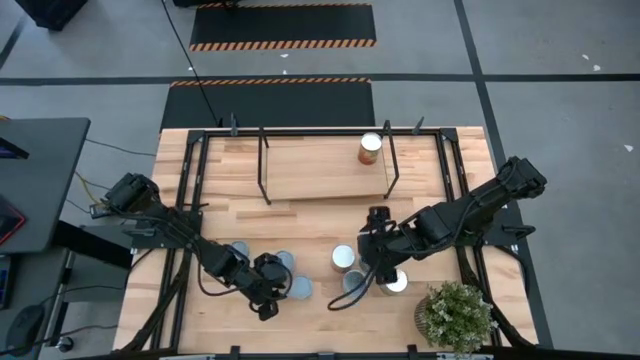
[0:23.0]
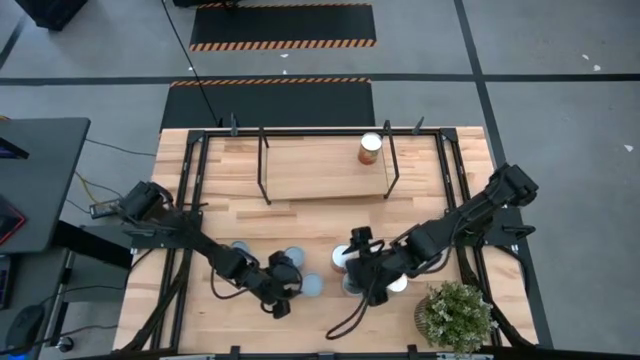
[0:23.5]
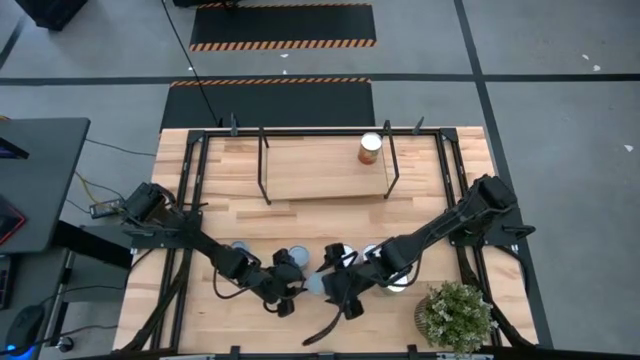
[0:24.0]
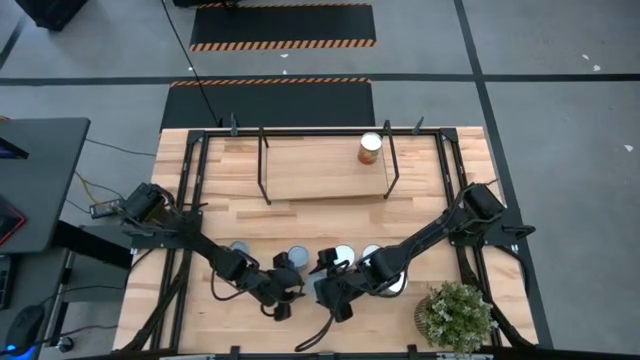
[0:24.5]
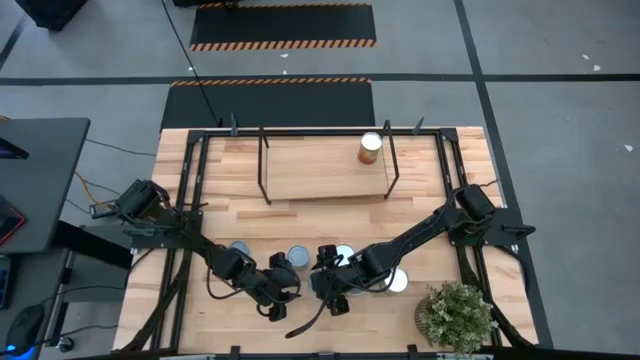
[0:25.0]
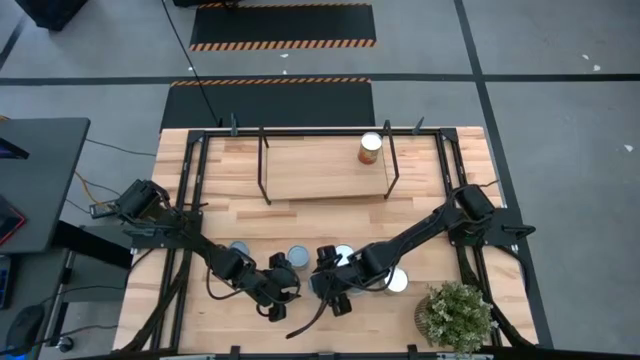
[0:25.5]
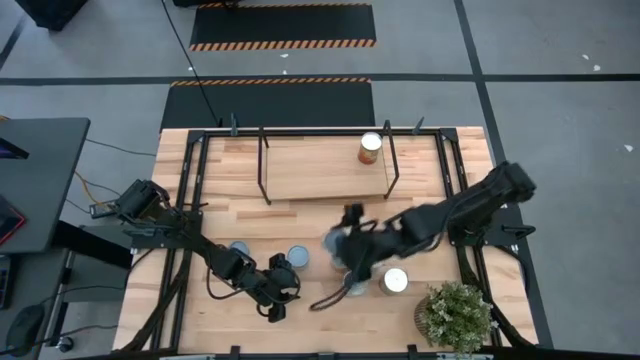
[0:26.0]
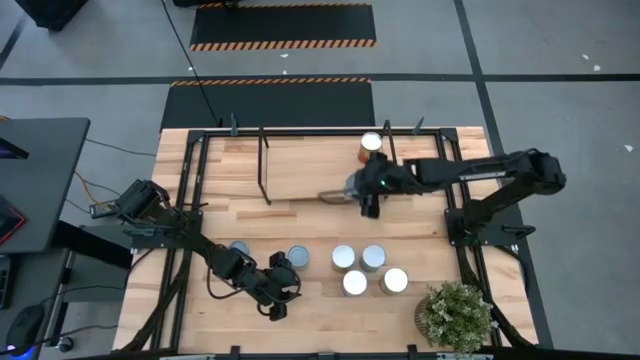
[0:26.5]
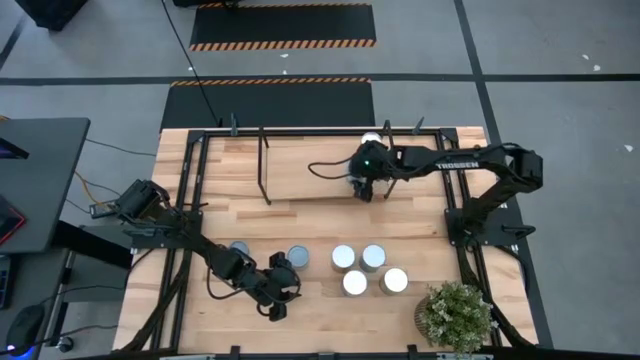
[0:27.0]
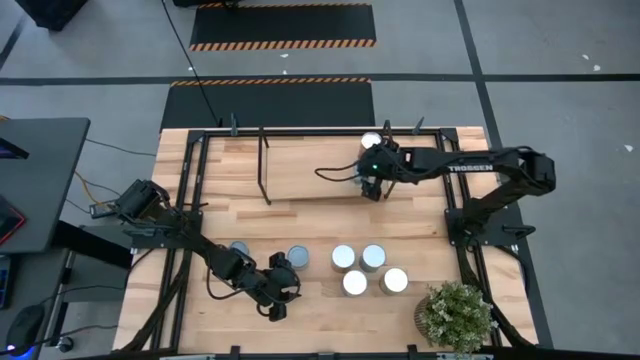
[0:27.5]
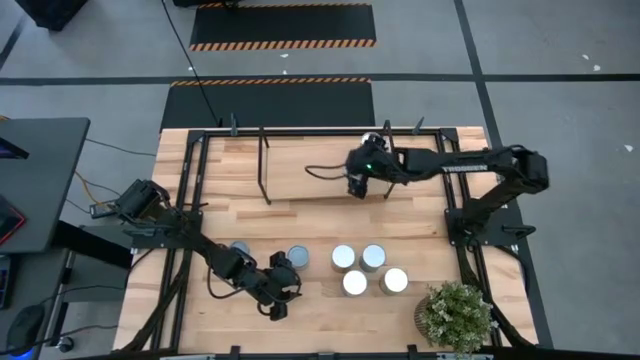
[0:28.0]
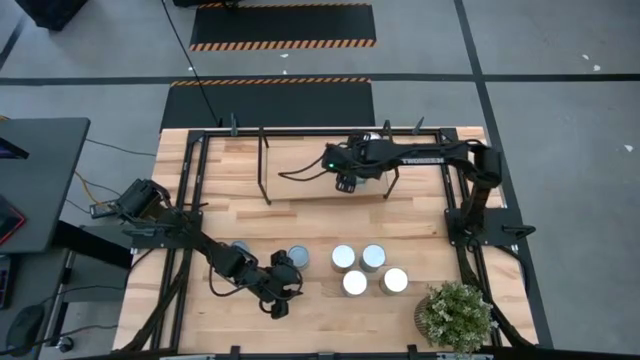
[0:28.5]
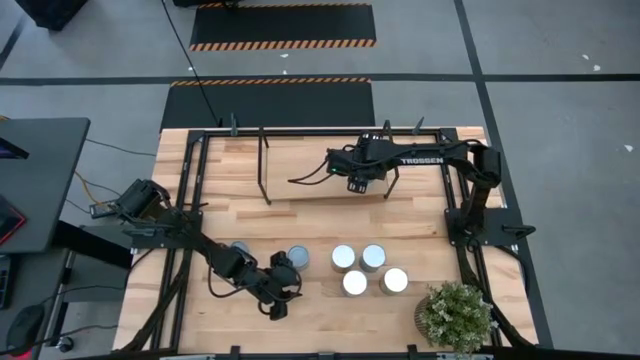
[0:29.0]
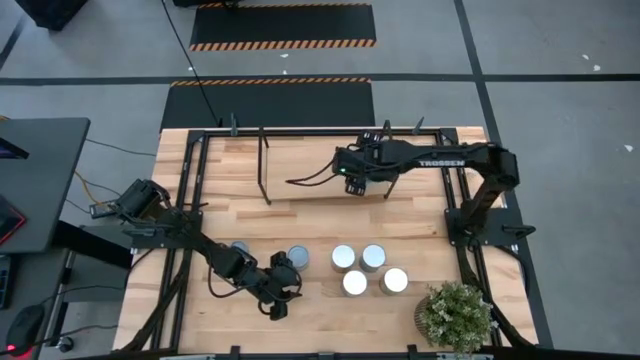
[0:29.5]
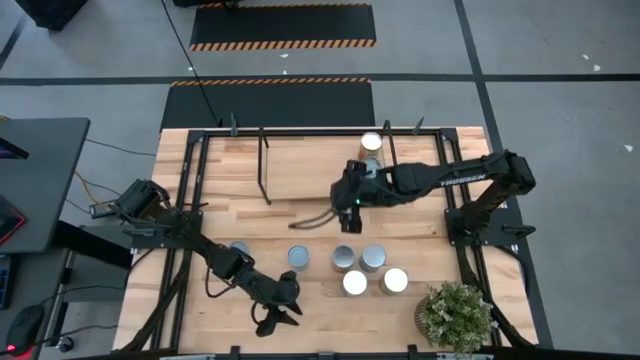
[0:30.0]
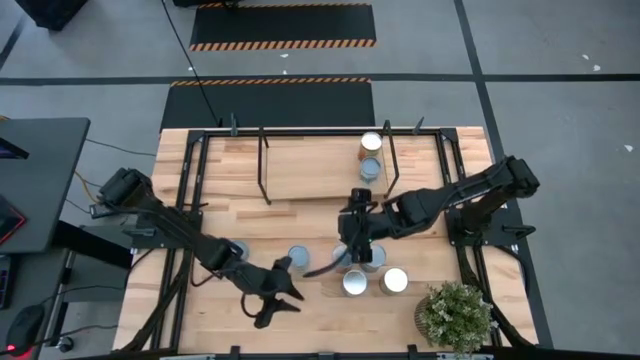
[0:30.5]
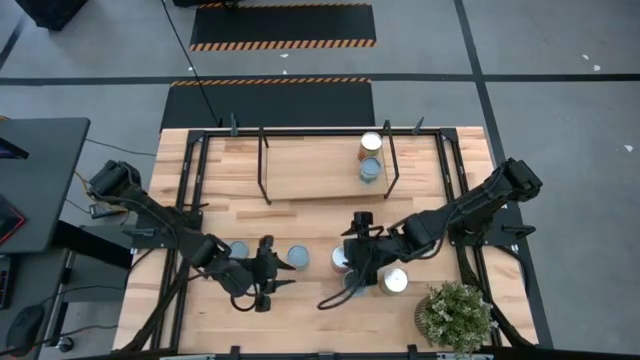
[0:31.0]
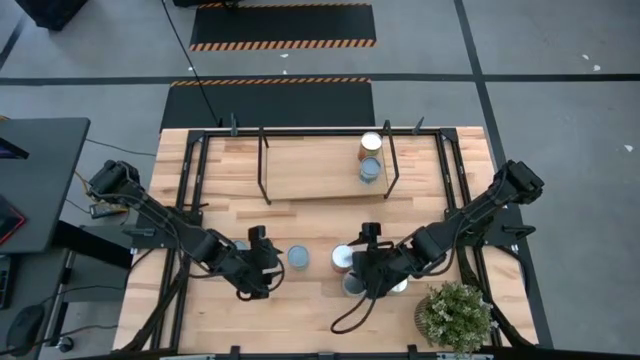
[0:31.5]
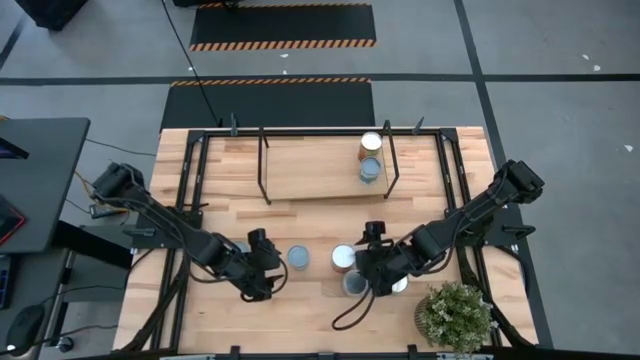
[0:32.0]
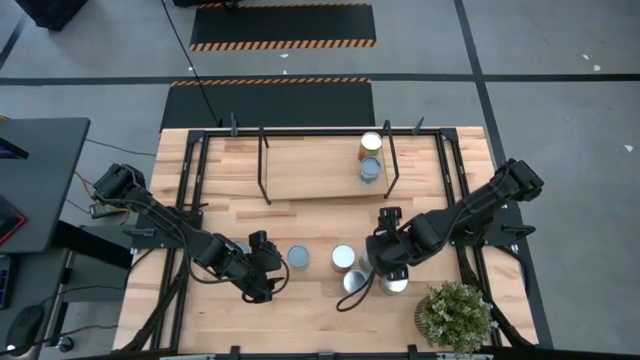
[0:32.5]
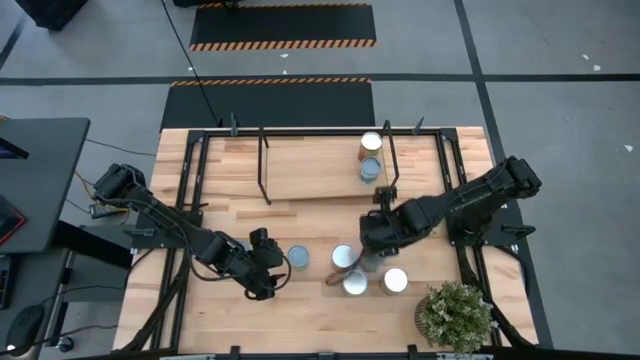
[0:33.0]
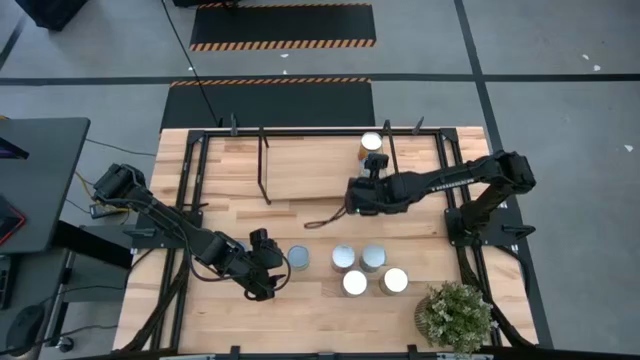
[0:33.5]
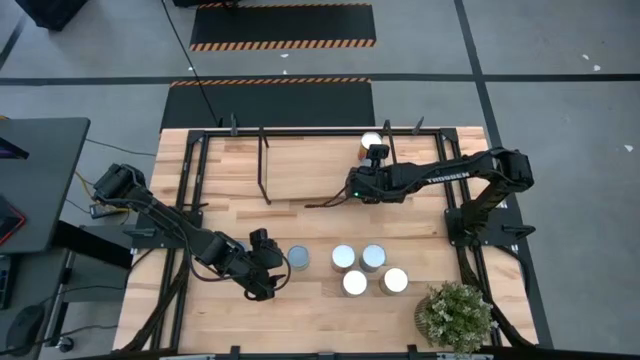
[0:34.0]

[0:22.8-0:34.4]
Task: Pick and place cans onto a shelf
Put the canned mixed vegetables on the shelf

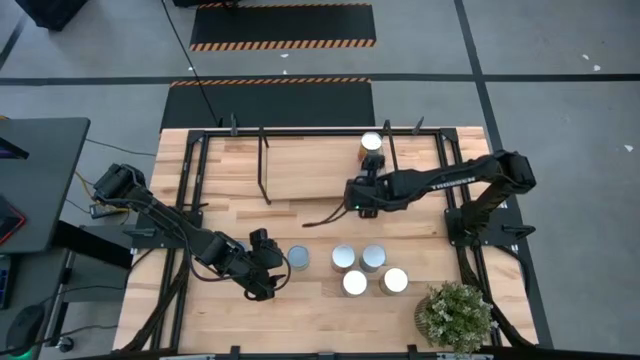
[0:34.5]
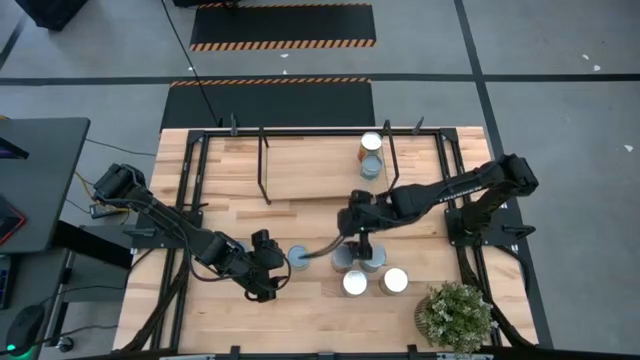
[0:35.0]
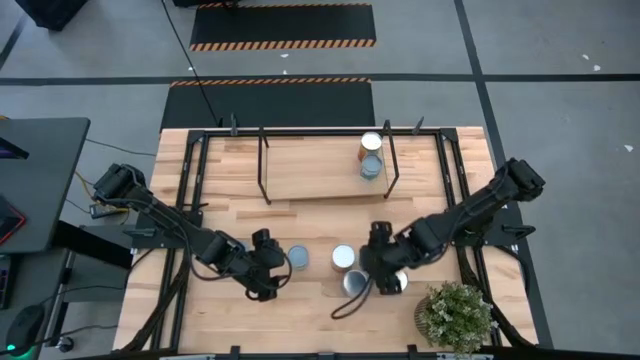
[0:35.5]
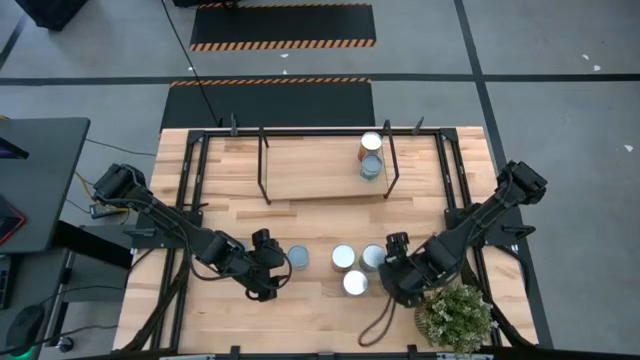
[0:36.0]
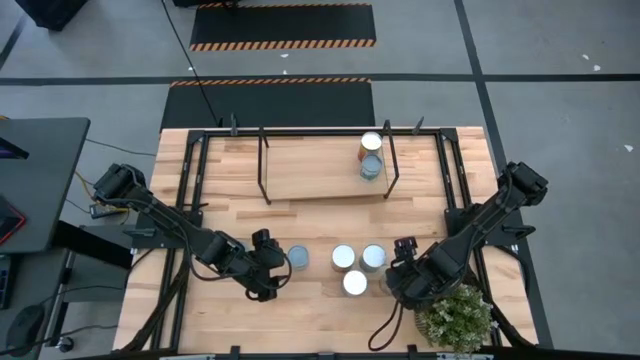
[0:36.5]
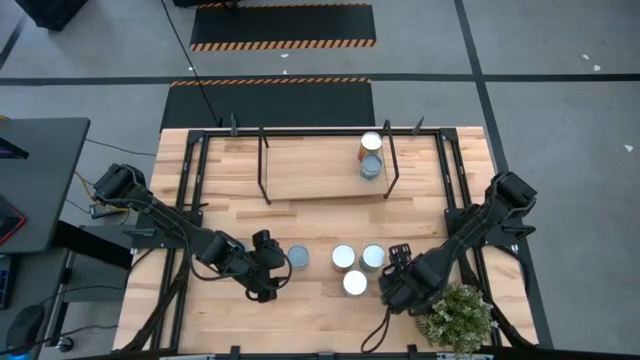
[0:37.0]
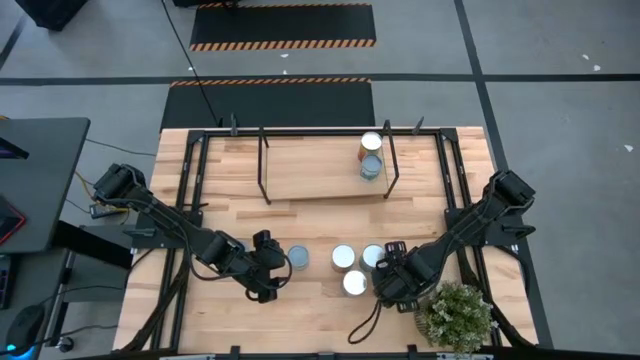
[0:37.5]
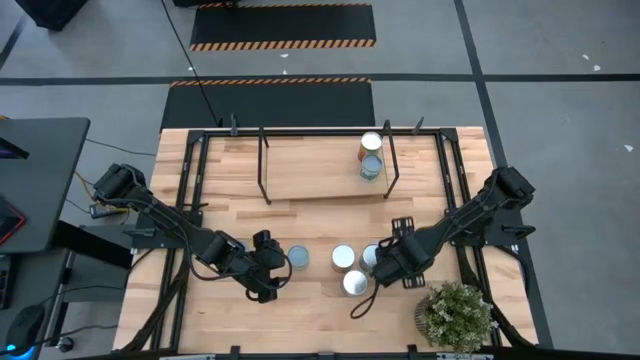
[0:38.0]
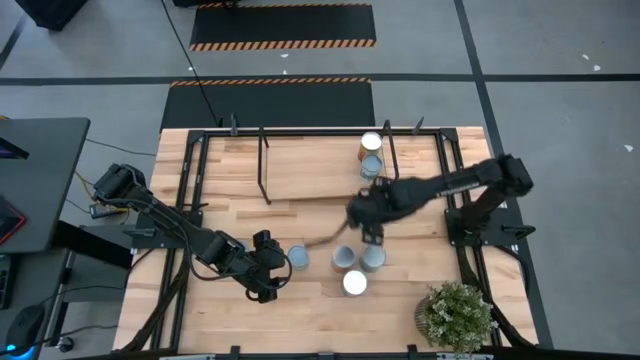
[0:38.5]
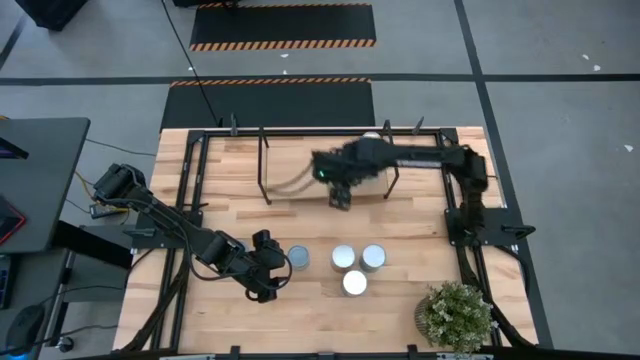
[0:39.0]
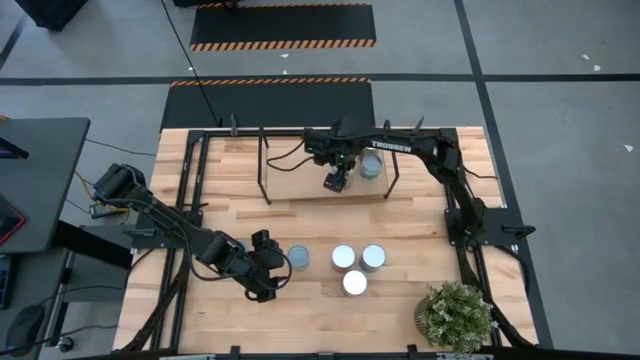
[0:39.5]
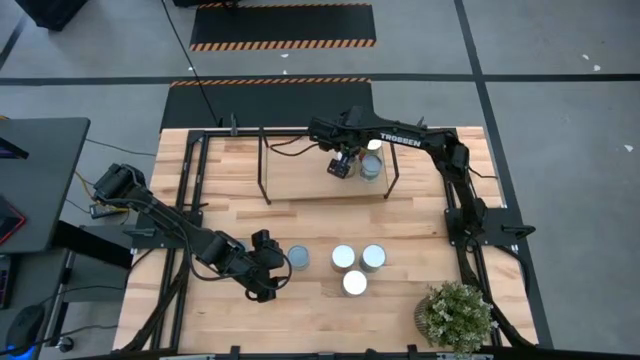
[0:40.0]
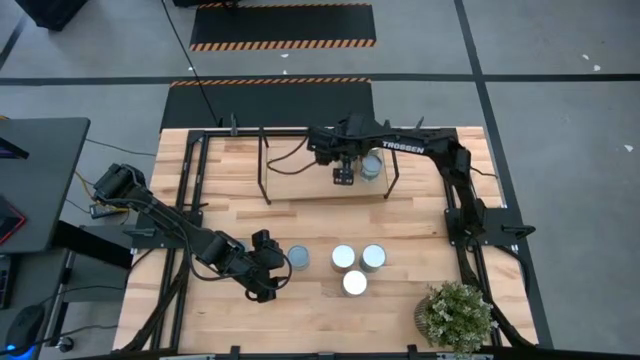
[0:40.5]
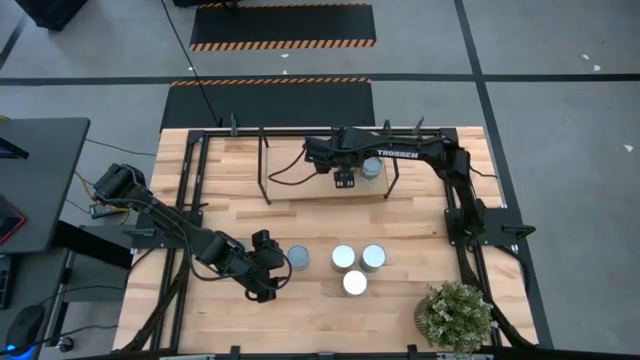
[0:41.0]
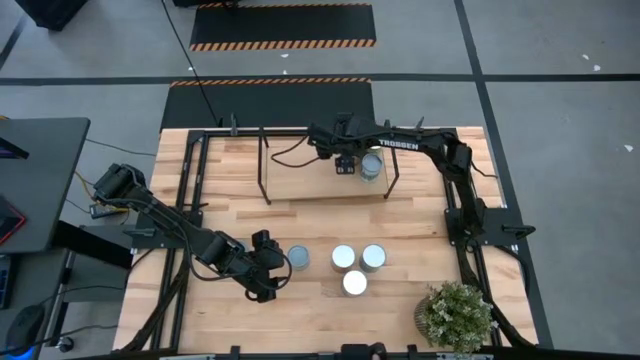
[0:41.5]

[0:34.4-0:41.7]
Put the canned oranges on the shelf

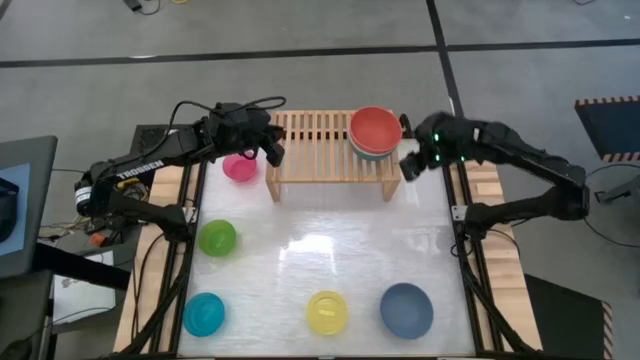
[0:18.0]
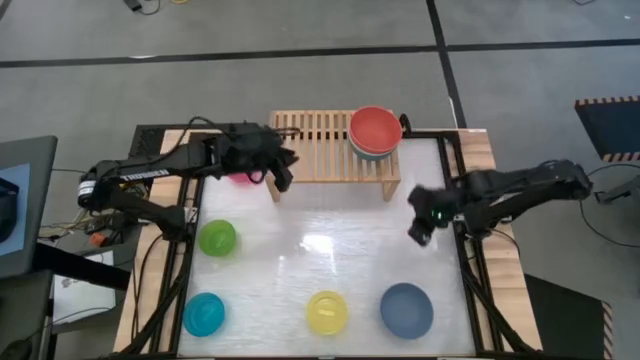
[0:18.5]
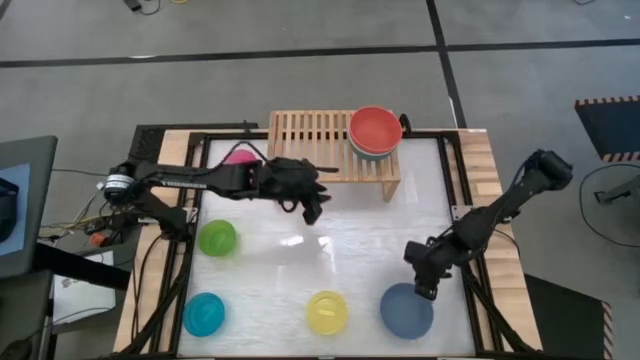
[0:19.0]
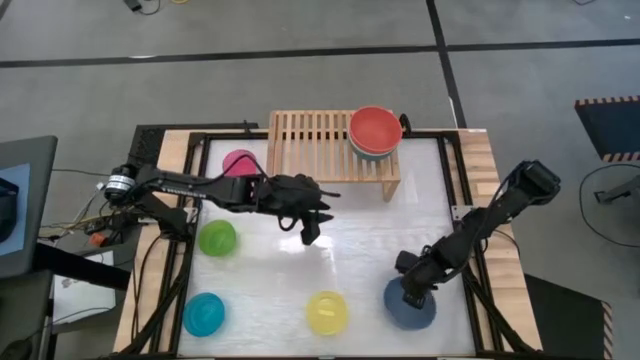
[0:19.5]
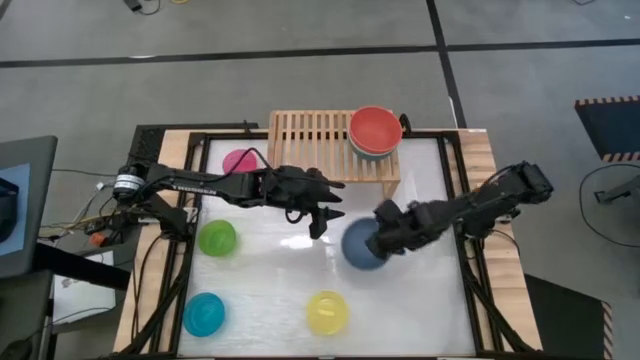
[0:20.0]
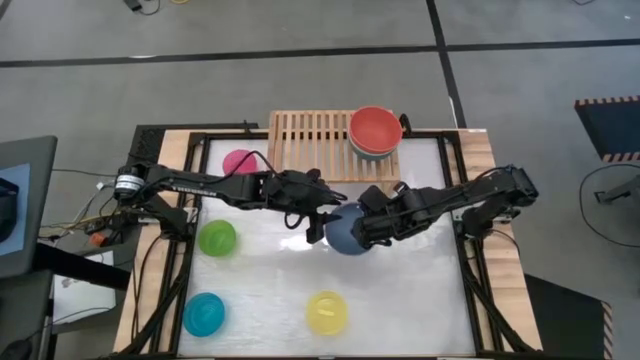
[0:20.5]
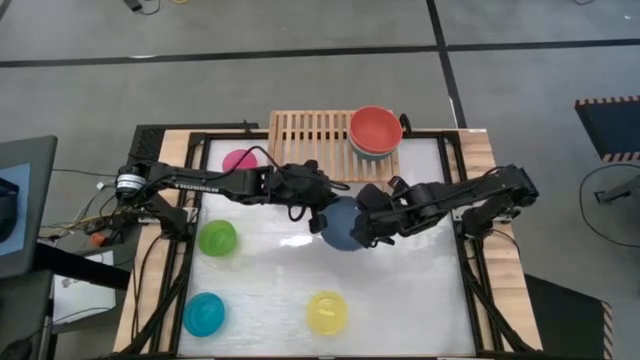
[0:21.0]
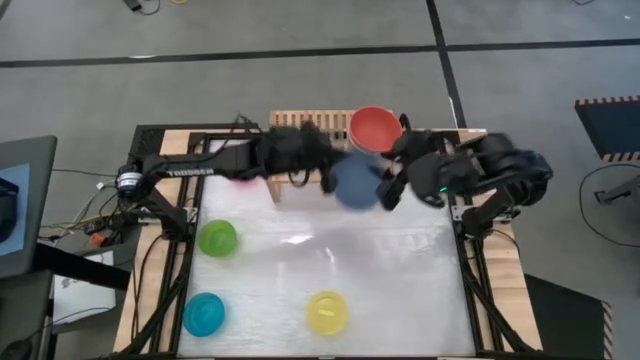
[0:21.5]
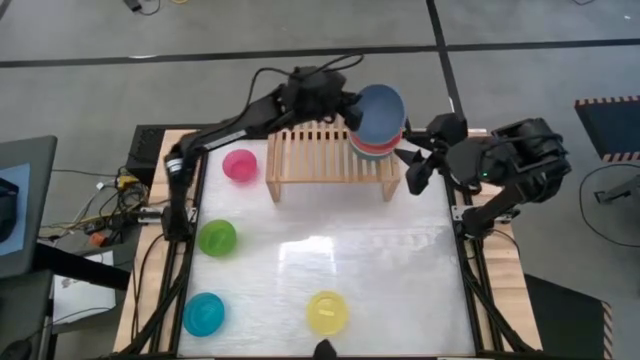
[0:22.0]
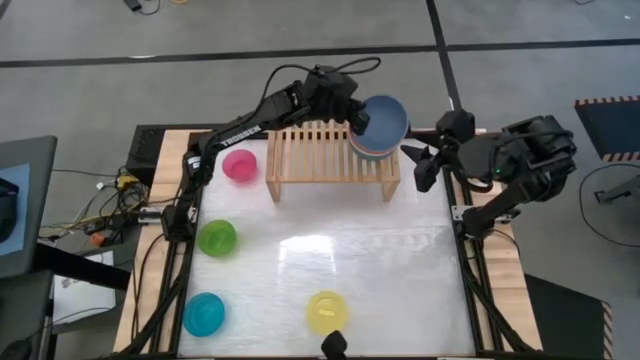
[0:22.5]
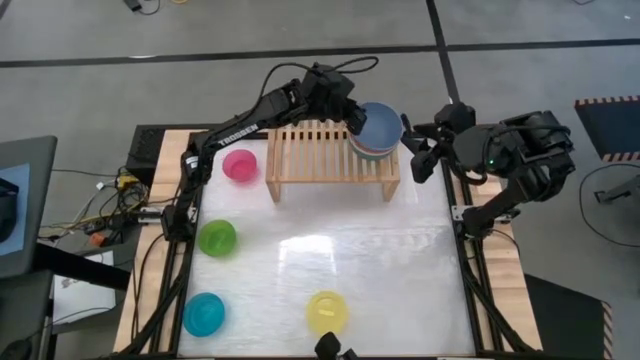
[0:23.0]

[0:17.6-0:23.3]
Task: Place and stack bowls onto a shelf
Stack the dark blue bowl on top of the orange bowl on the shelf
